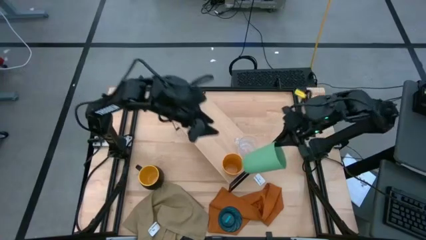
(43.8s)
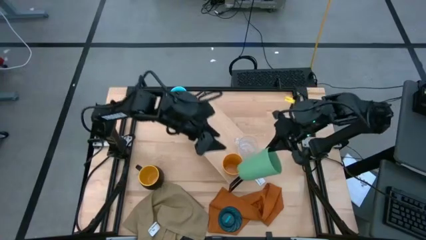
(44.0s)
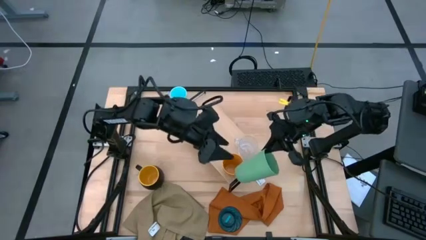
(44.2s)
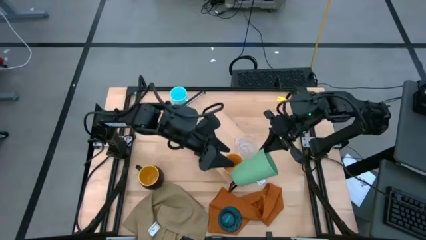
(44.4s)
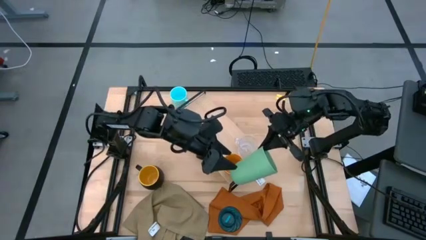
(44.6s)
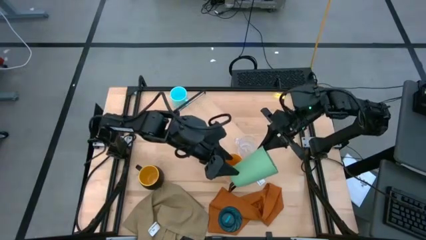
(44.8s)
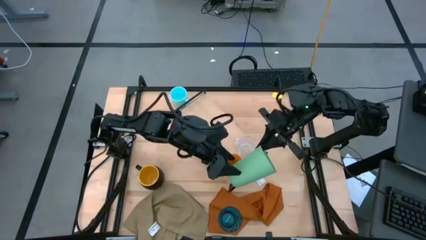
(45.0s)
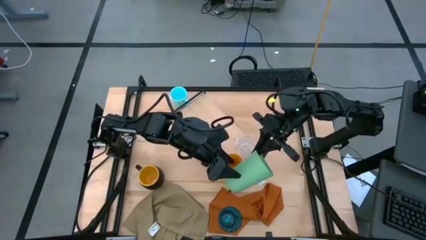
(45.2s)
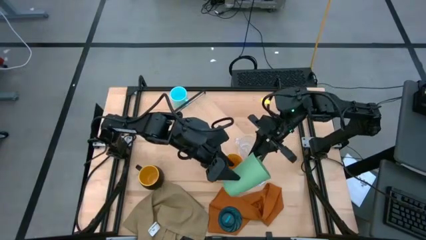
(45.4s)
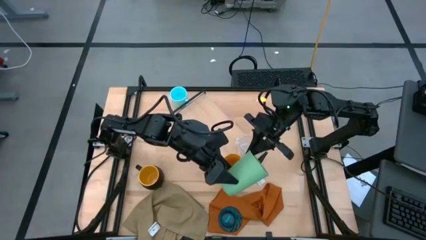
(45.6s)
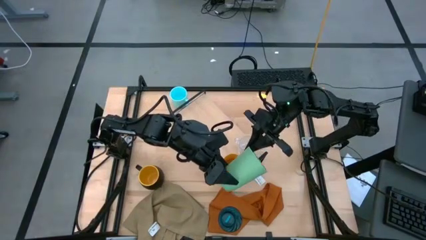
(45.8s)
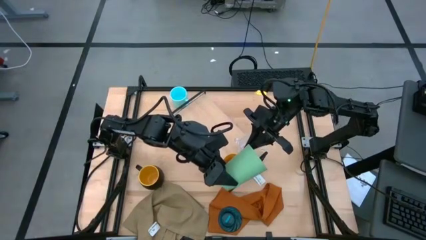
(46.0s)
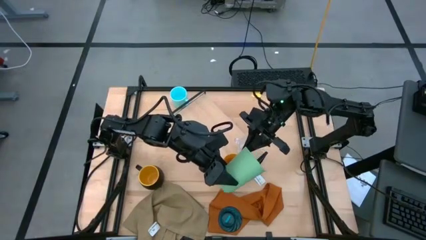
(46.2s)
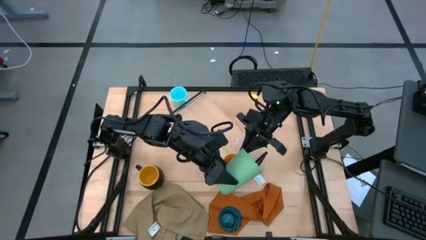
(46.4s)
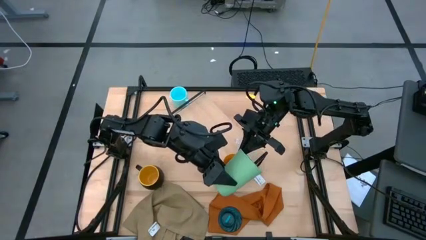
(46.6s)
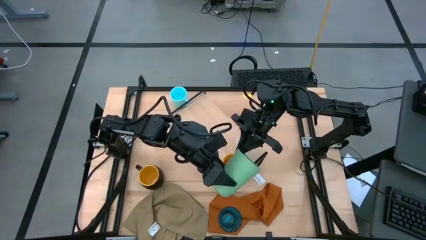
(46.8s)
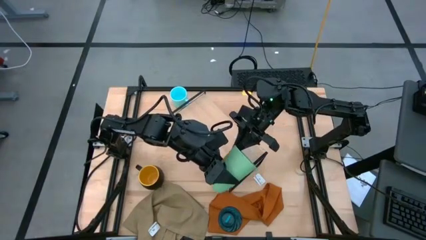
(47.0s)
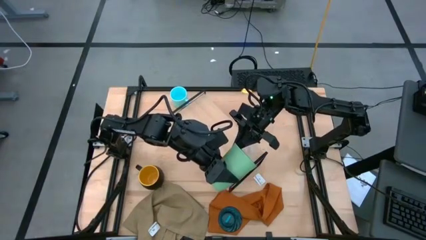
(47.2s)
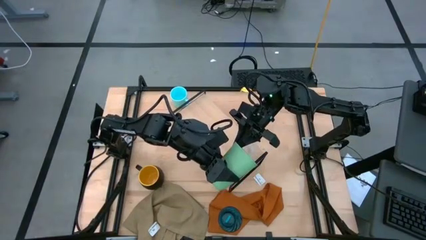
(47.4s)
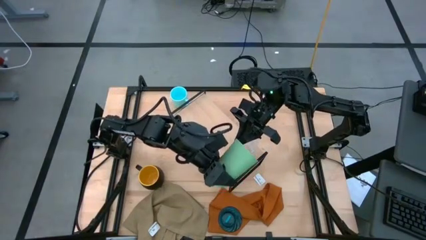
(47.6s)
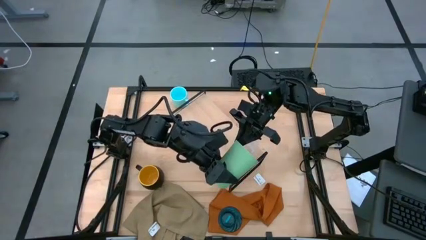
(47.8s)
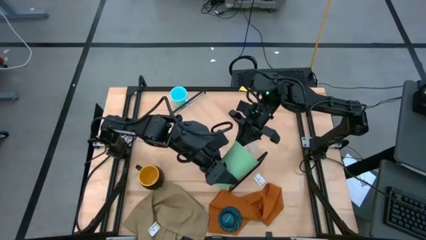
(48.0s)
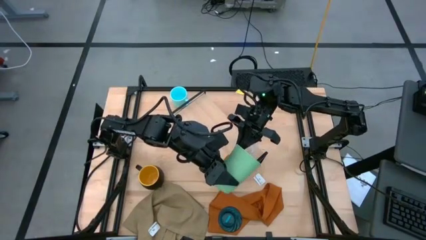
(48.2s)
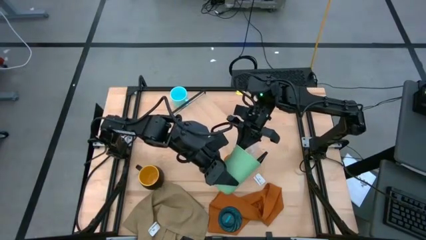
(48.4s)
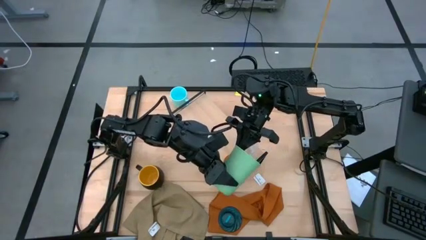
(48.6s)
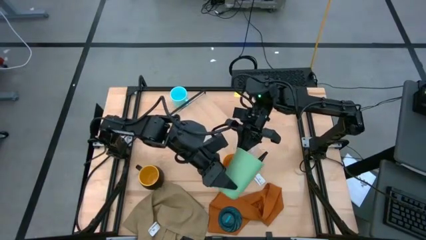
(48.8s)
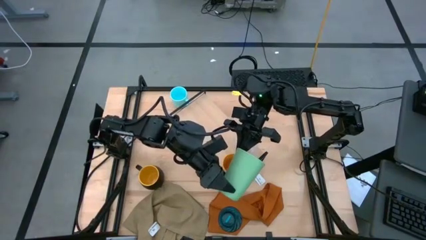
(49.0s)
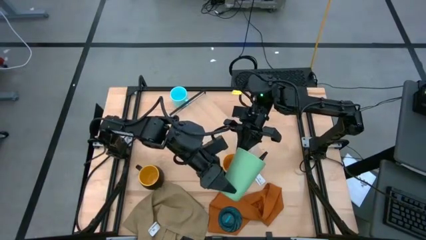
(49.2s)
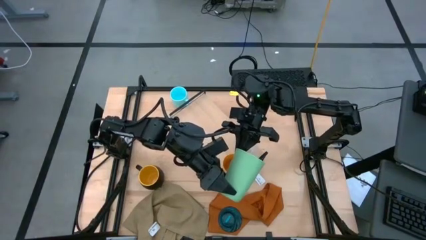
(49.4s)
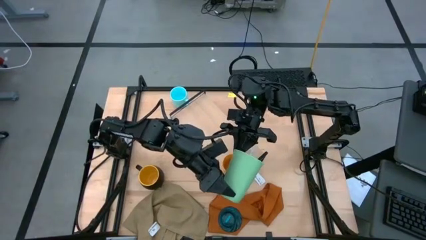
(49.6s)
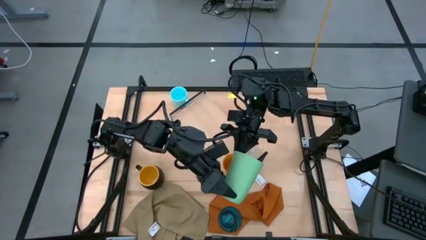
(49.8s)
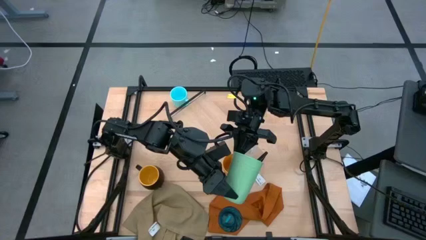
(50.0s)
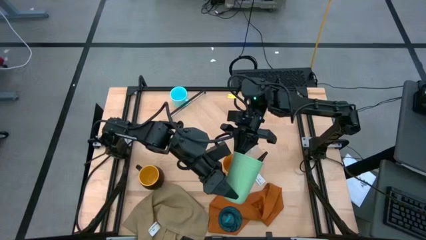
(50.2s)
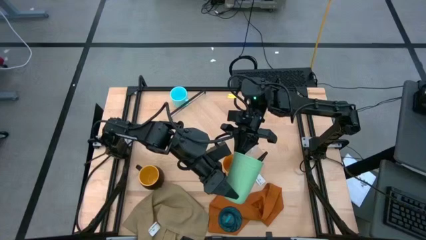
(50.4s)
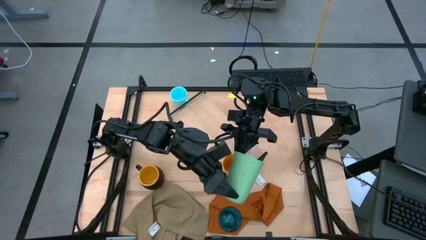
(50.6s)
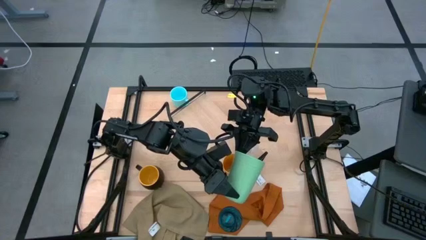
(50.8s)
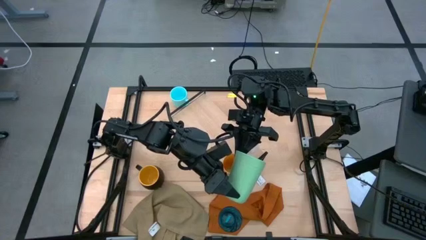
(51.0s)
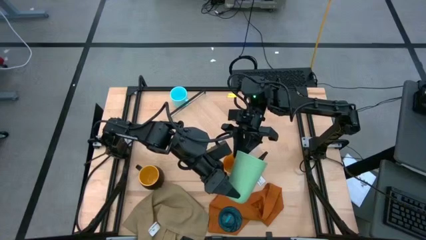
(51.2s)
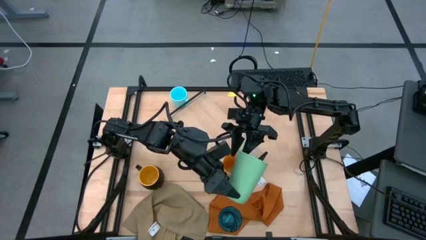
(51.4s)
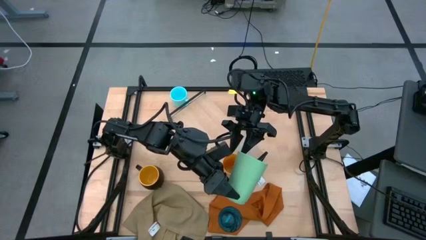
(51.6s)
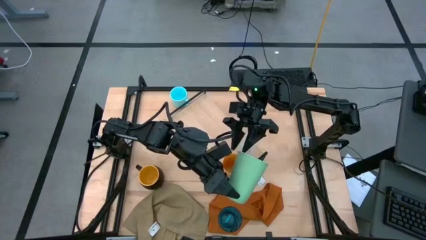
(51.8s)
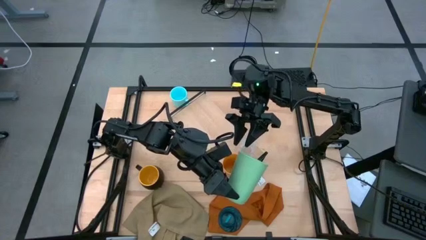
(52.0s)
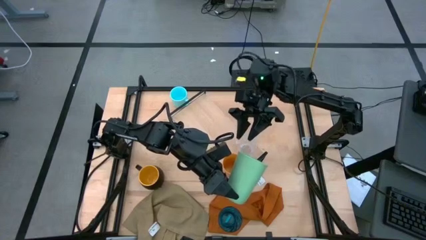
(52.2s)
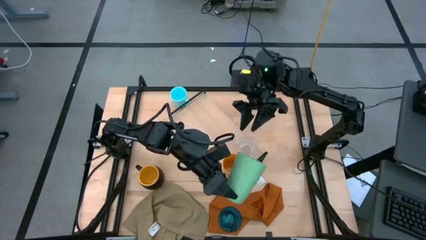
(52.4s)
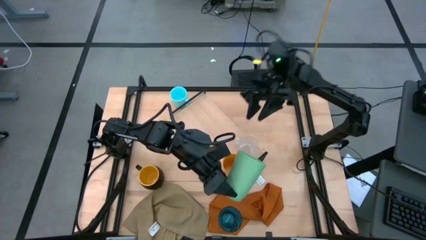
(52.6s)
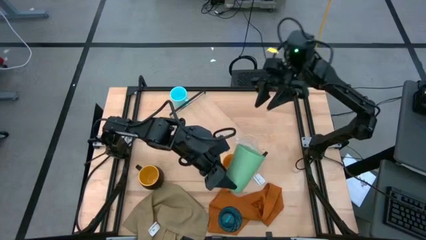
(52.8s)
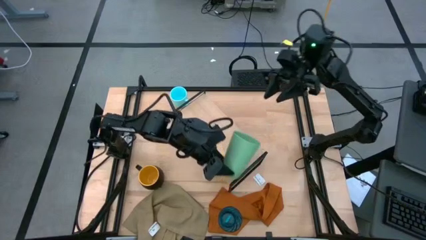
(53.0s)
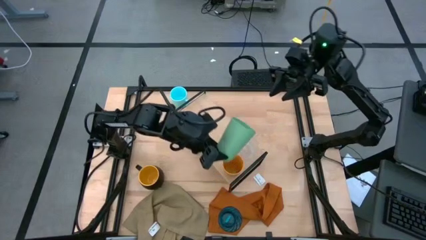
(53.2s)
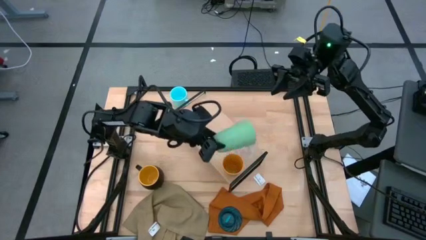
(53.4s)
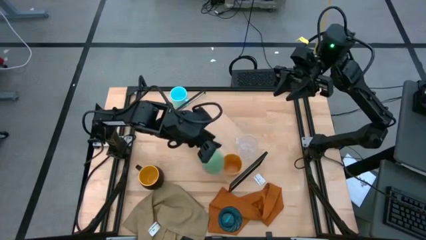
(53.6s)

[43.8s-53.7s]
Task: Stack small to large cups/mugs on shelf
Put the green cup on the shelf

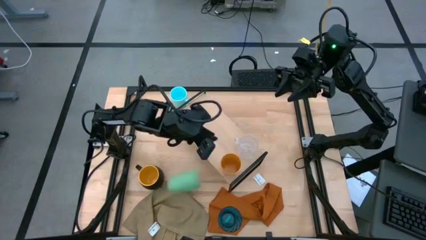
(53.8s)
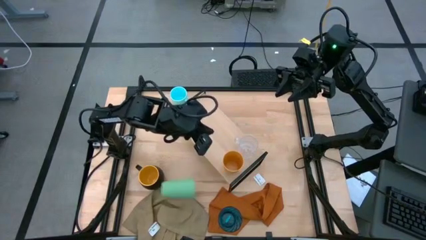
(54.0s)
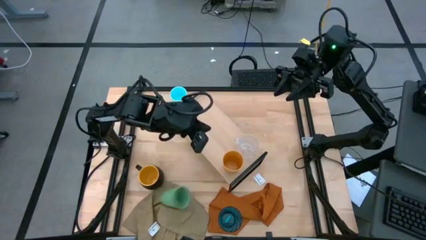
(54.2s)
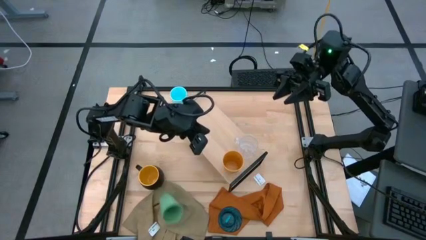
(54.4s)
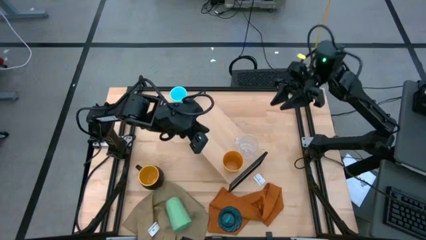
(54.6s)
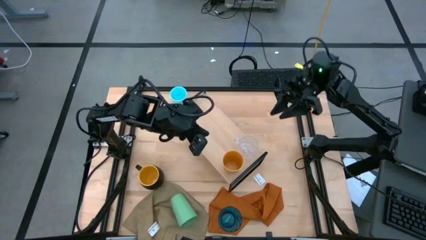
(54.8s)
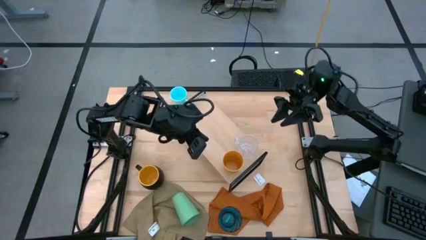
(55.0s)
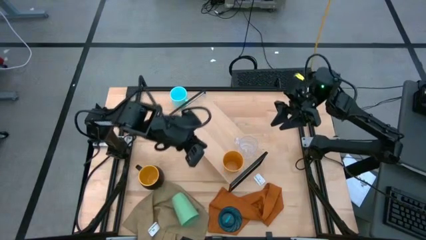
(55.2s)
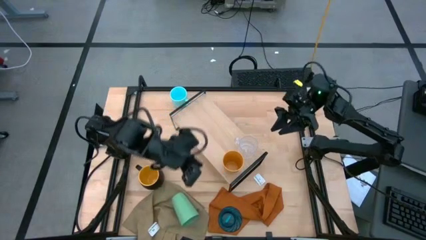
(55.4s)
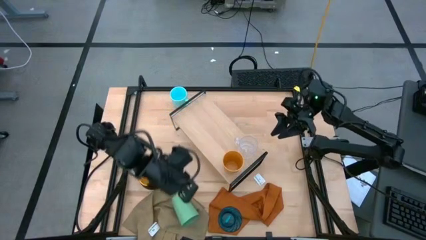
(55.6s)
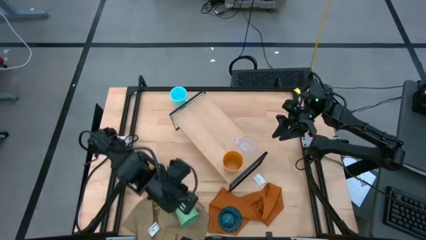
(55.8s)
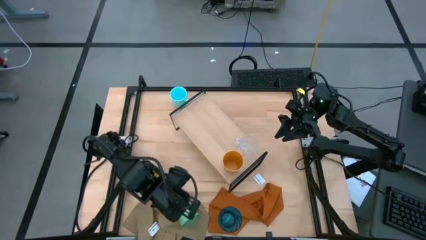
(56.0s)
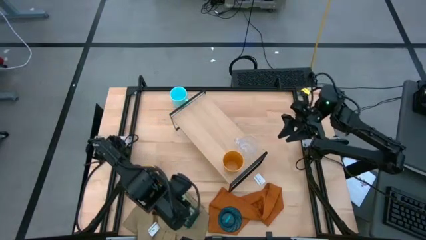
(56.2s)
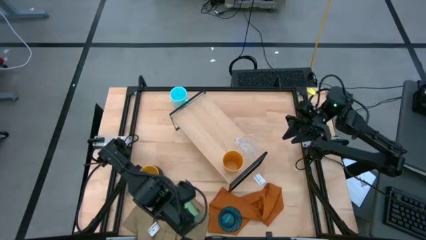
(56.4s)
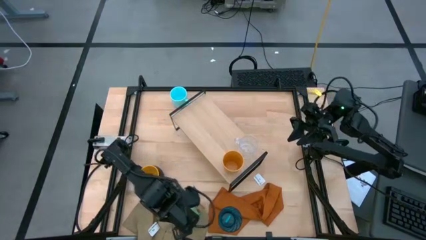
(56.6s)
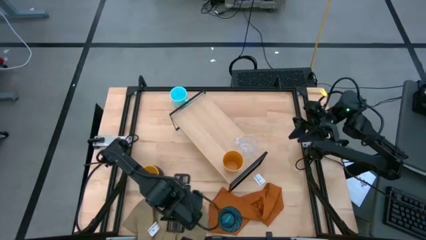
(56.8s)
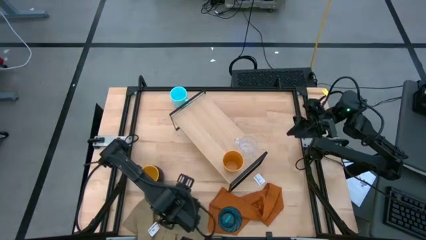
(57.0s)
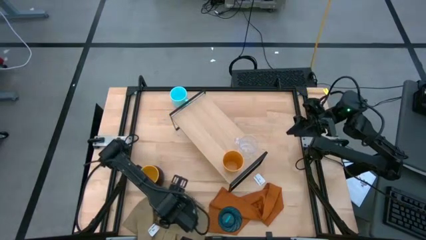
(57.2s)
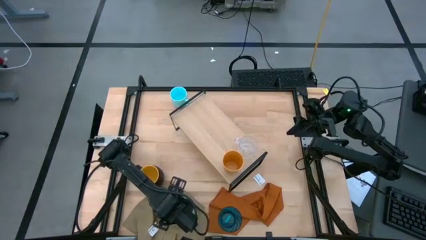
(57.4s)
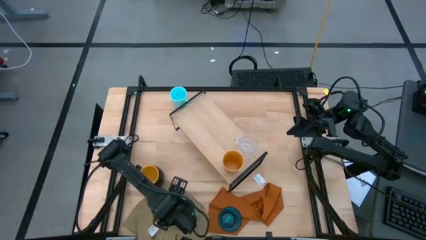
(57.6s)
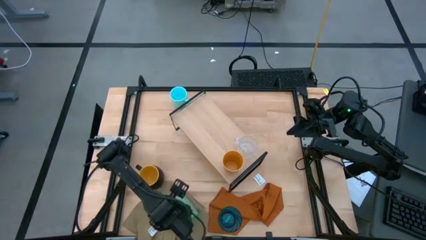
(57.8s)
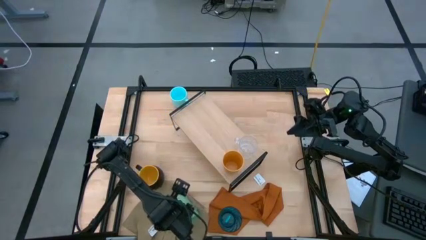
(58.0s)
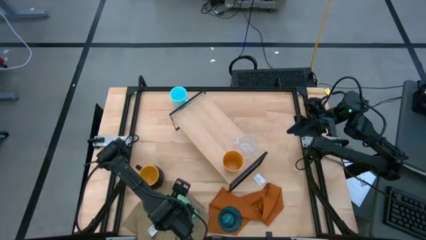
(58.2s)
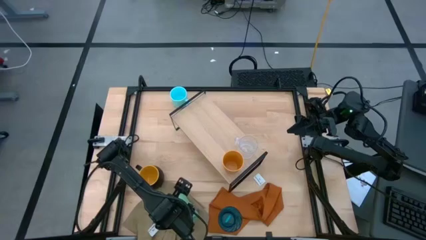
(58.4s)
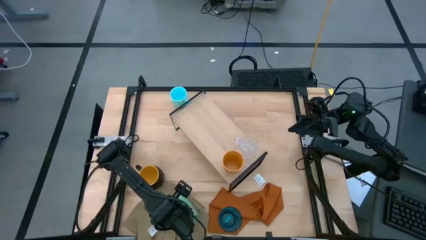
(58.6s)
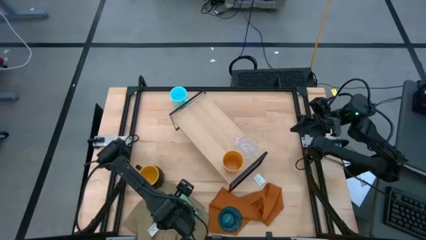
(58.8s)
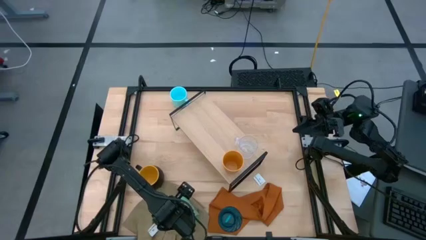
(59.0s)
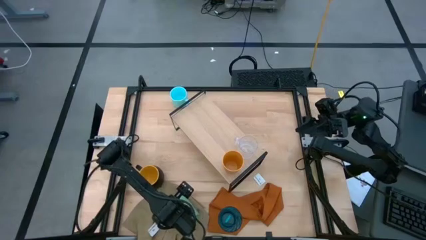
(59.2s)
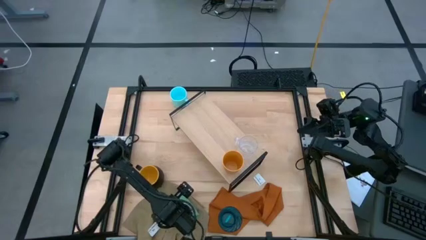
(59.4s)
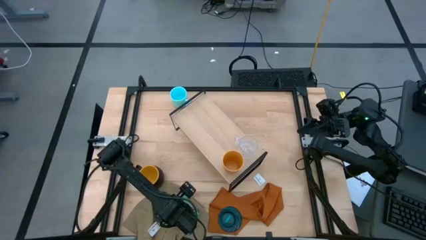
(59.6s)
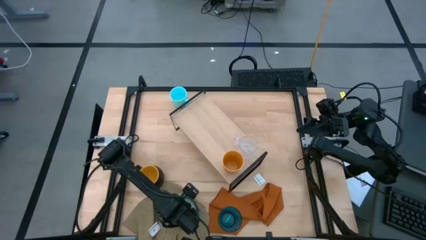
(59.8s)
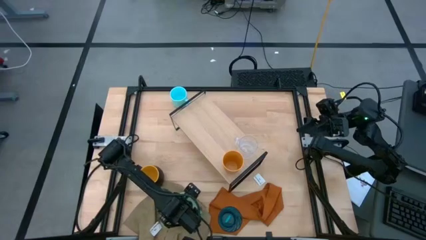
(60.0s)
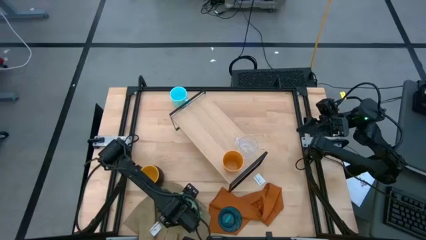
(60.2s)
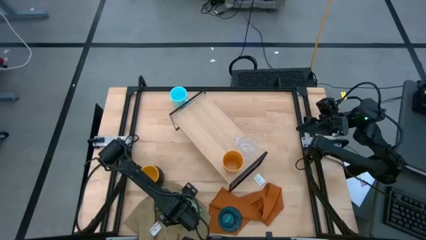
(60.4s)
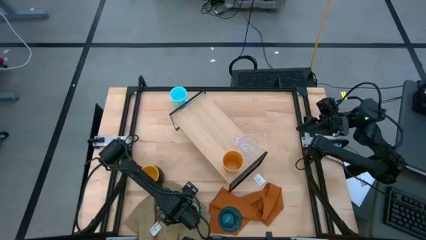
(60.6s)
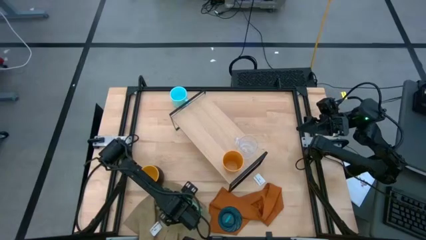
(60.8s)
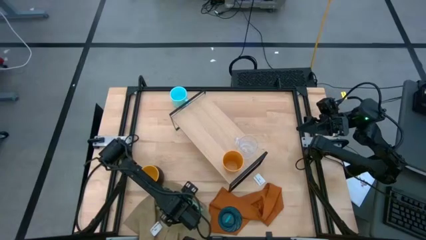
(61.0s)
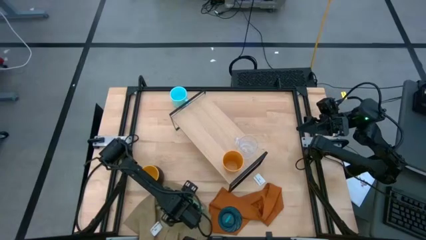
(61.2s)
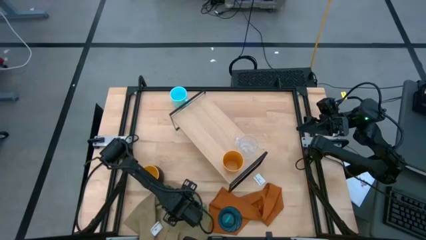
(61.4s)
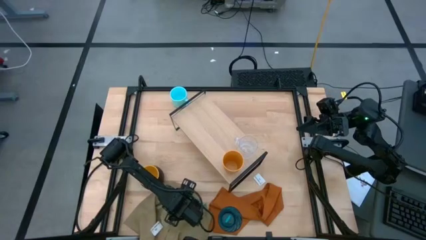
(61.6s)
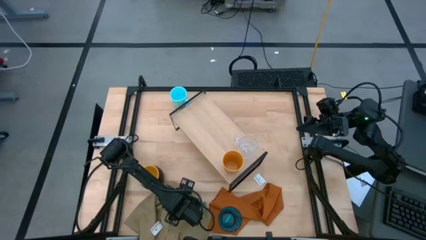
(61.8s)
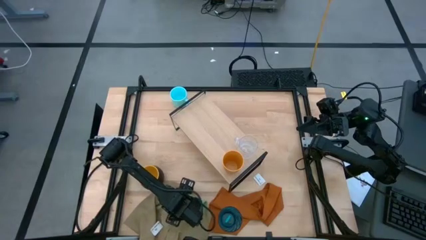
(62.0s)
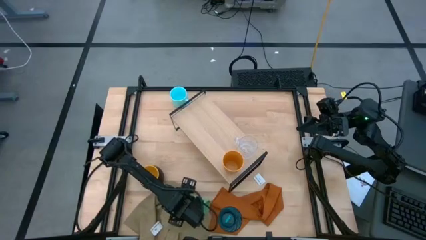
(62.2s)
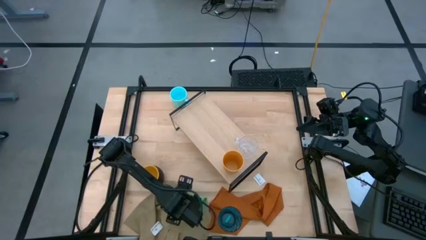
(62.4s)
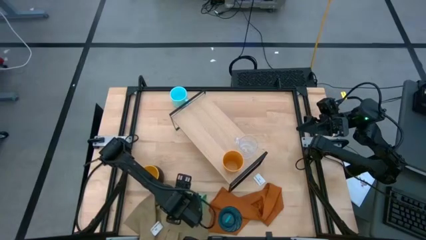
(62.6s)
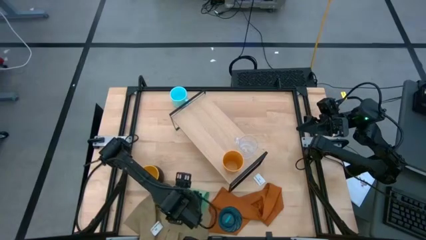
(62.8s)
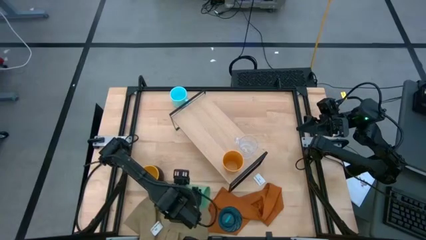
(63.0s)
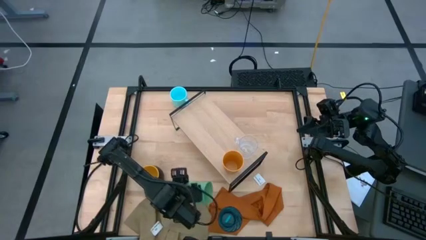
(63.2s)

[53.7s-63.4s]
Put the green cup on the shelf
